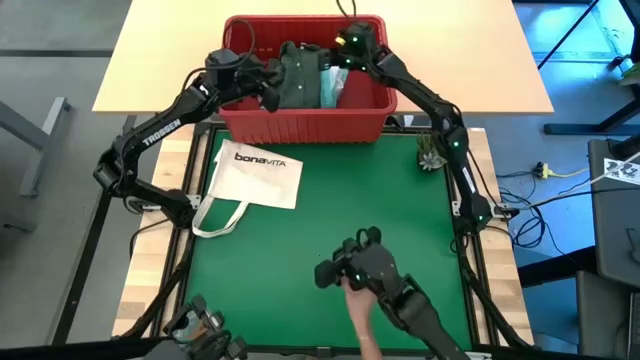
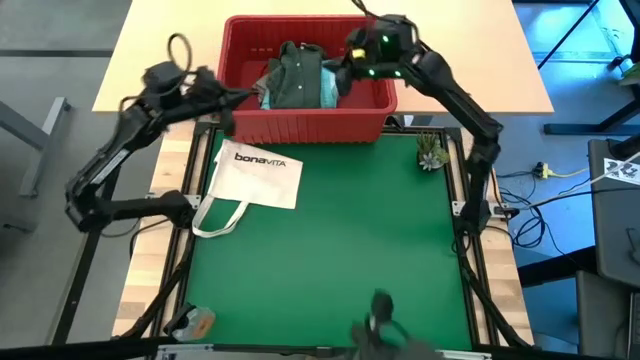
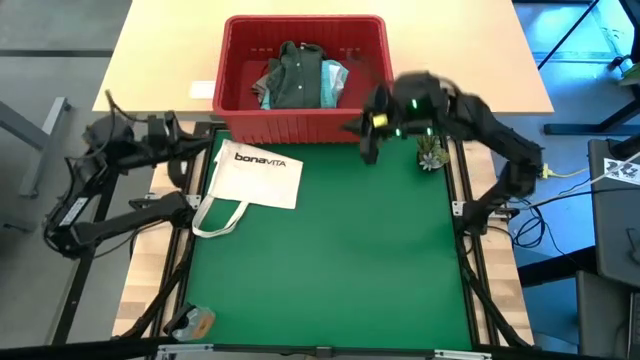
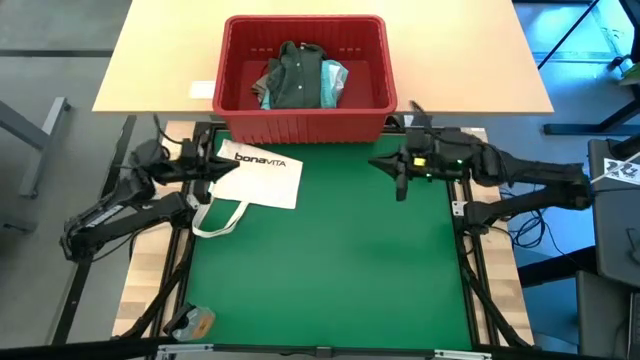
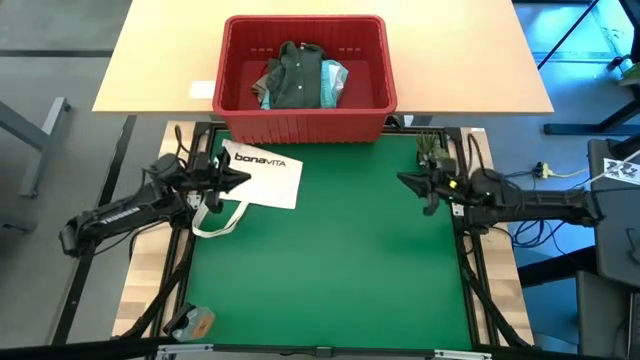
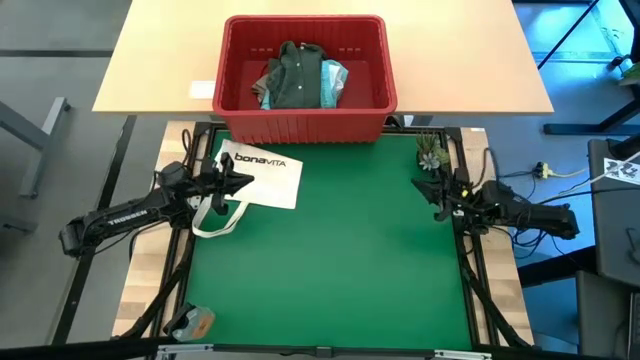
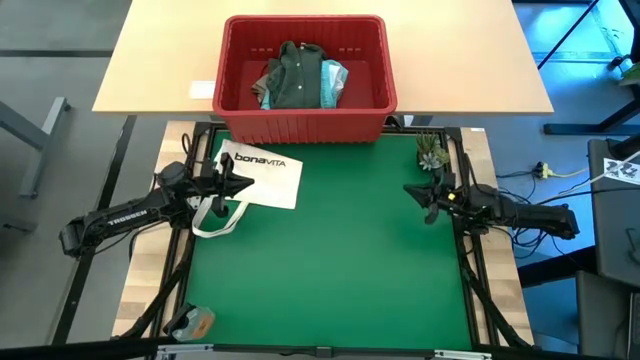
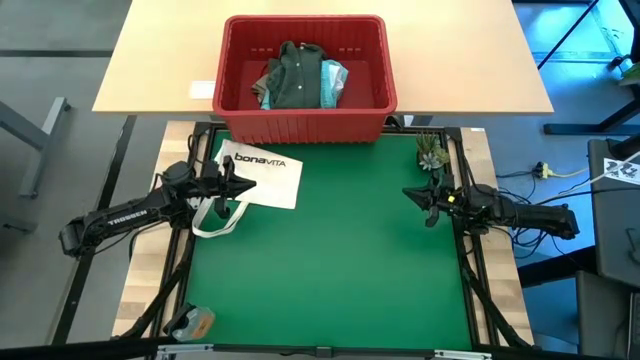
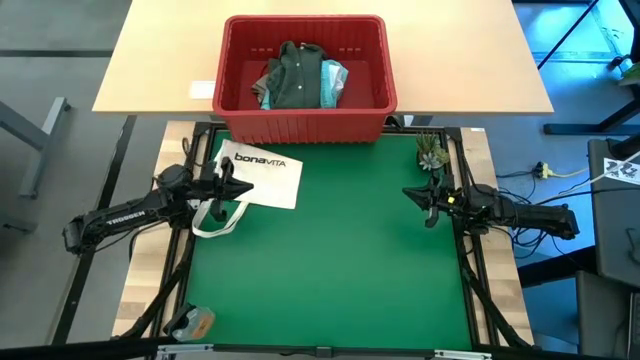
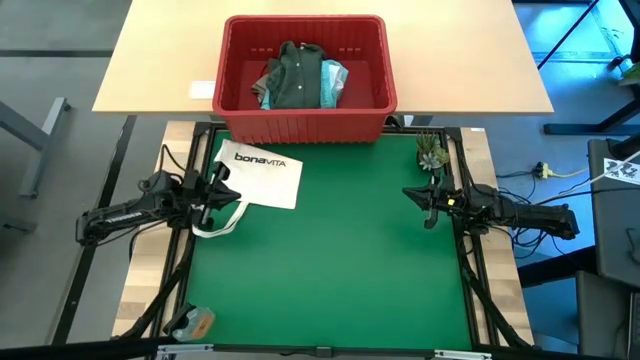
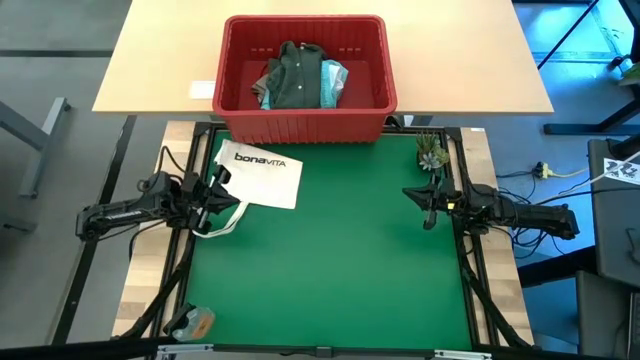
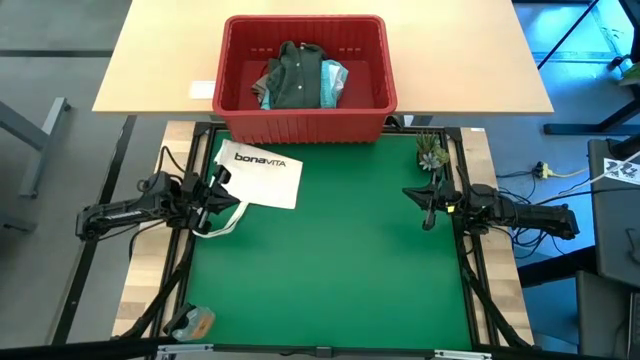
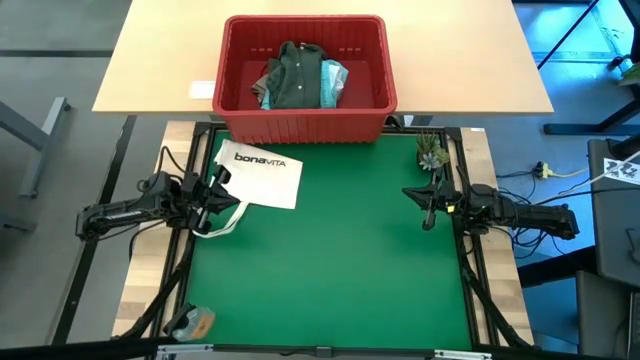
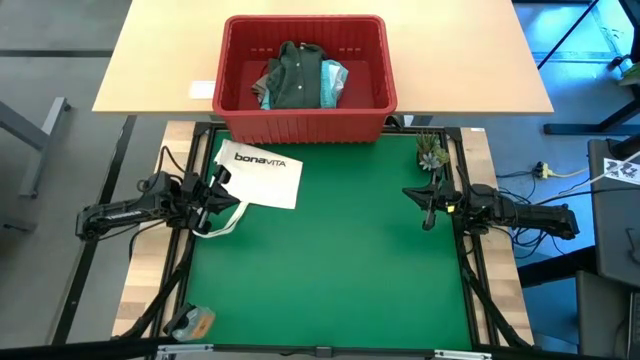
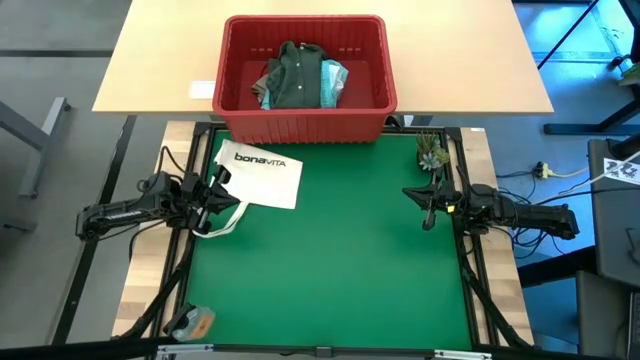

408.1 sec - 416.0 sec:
Task: Fold Laundry from Bin
Return to Home Position

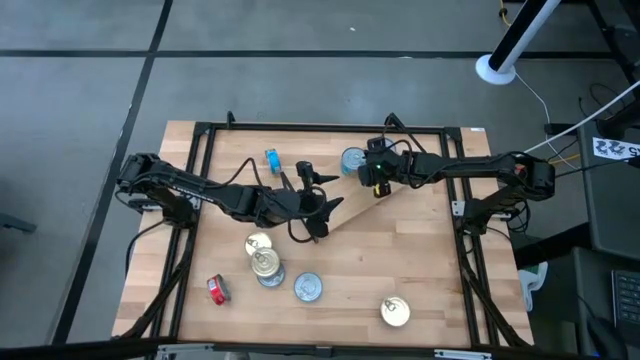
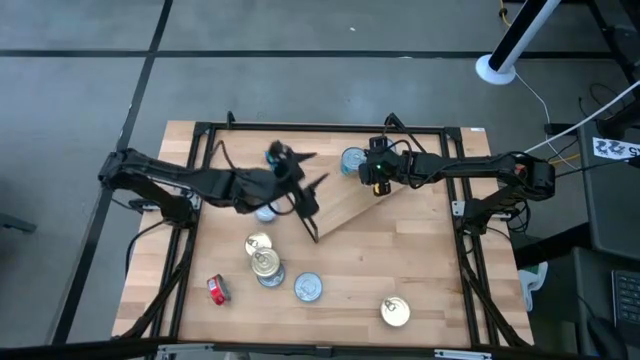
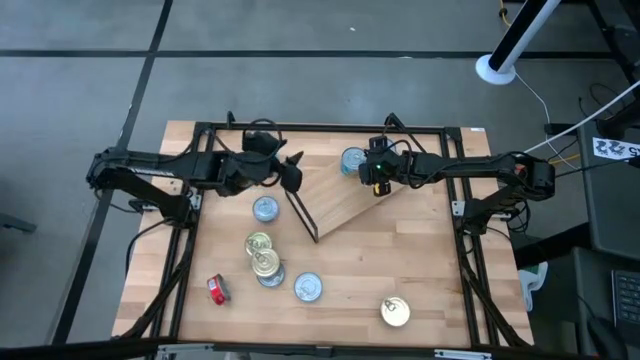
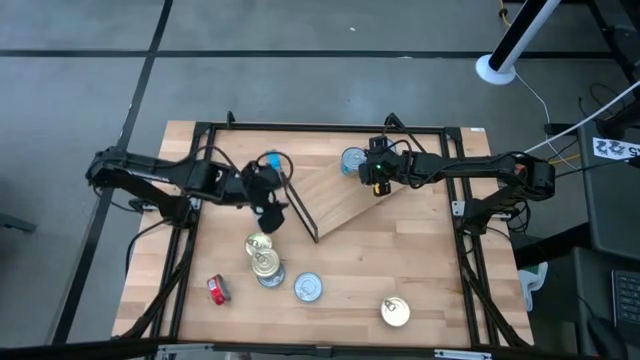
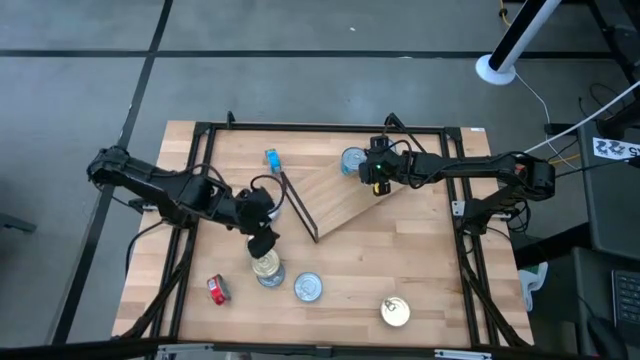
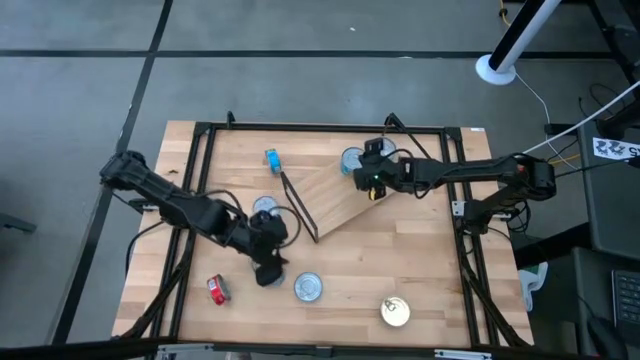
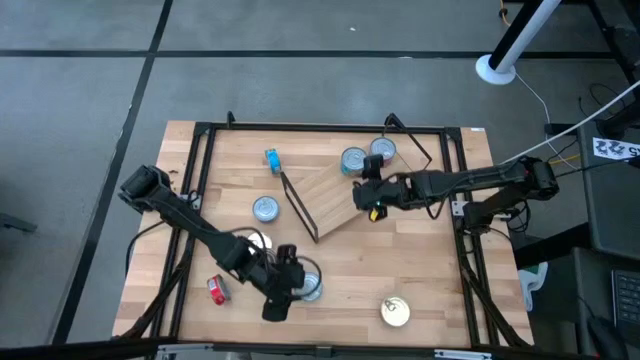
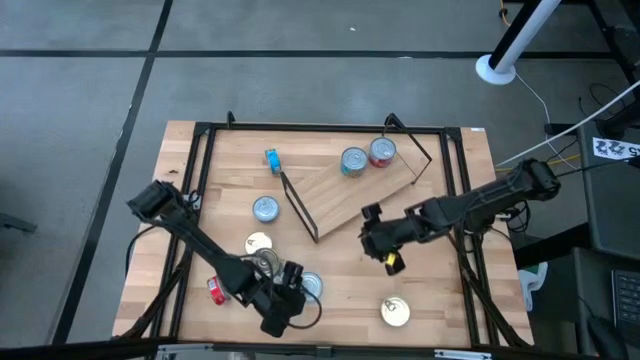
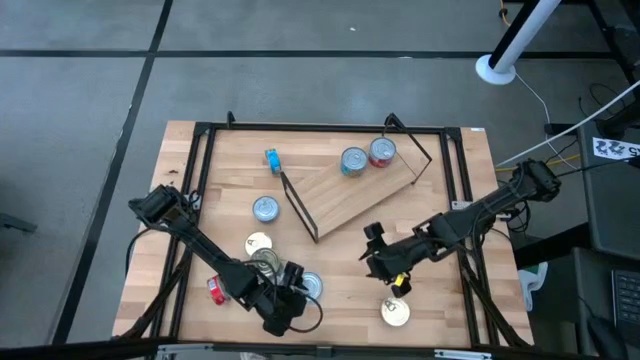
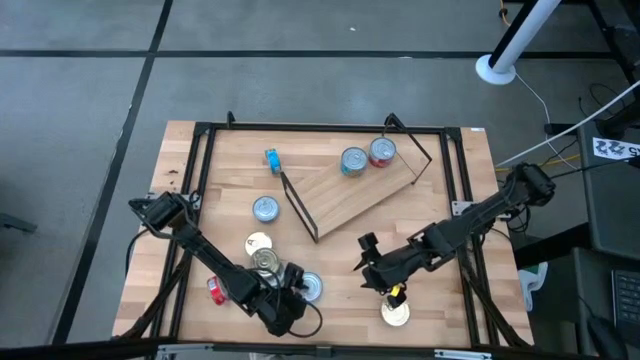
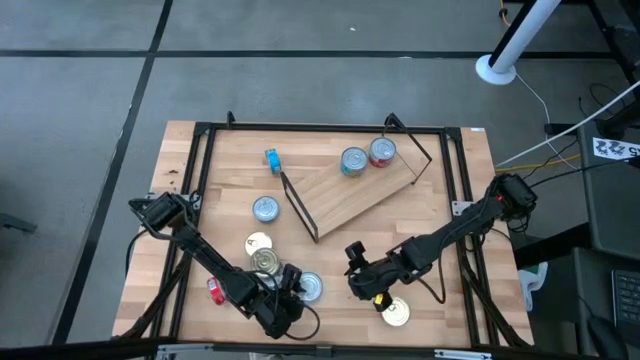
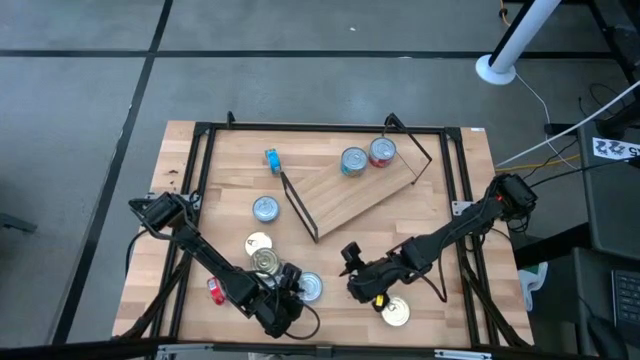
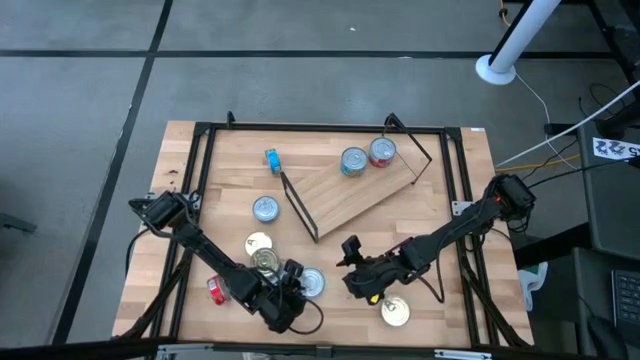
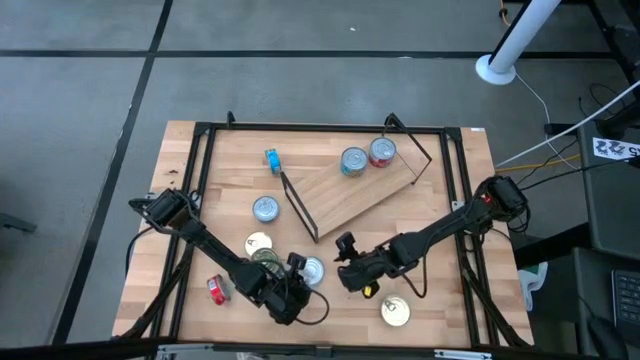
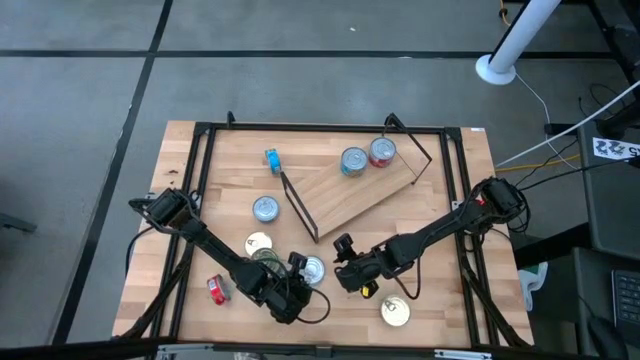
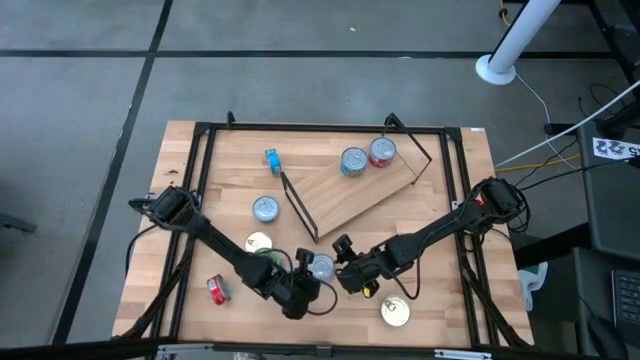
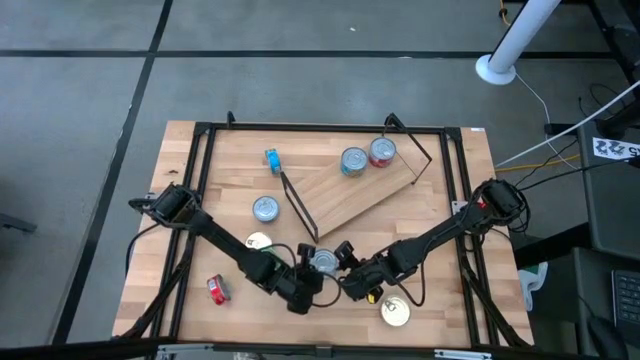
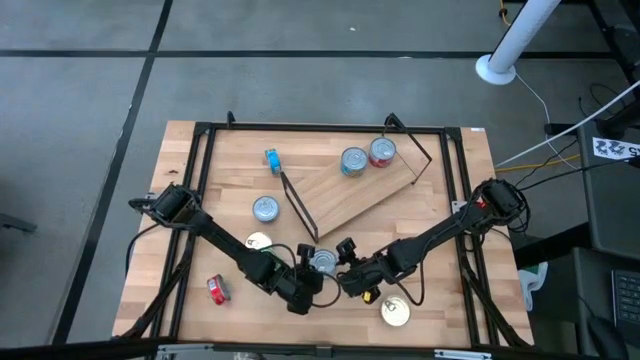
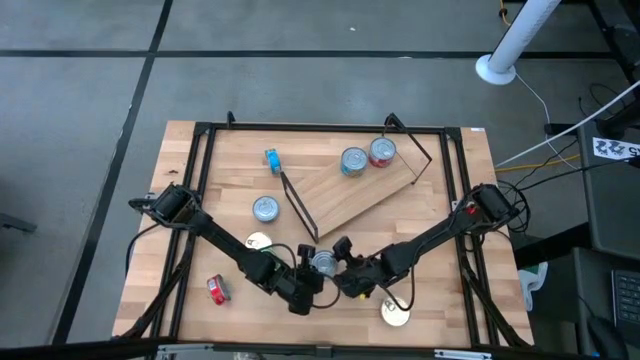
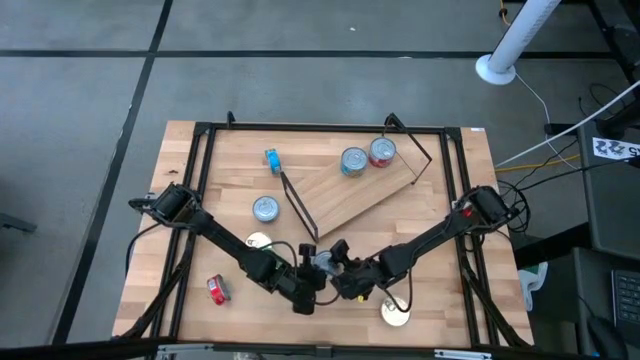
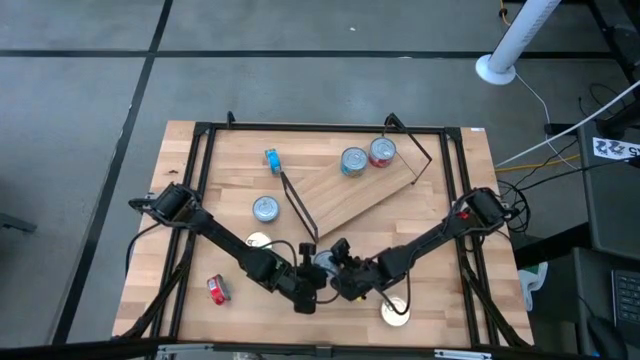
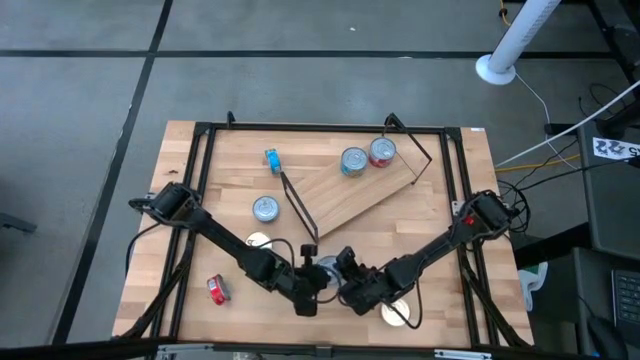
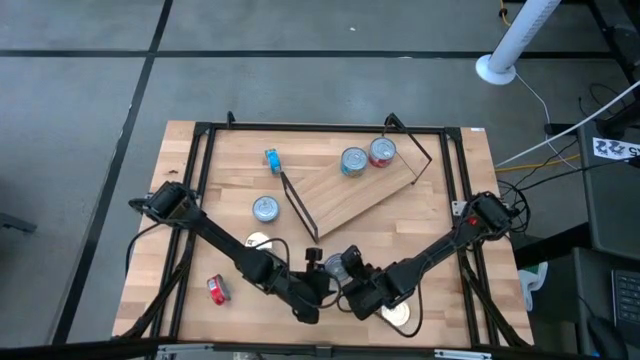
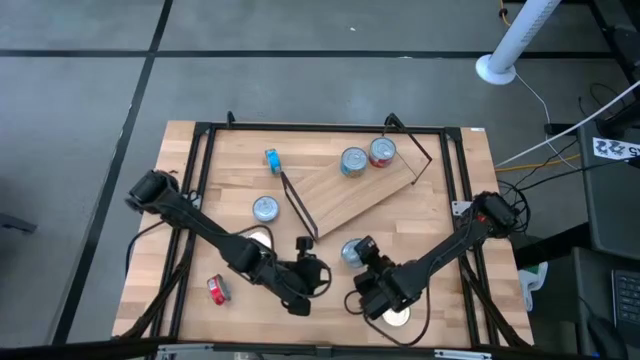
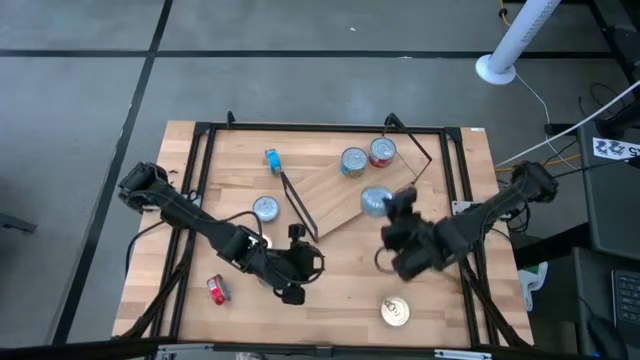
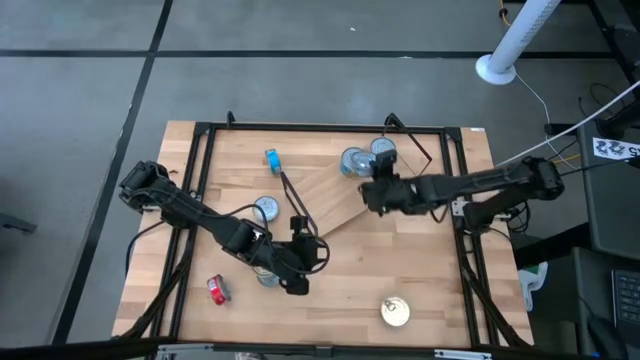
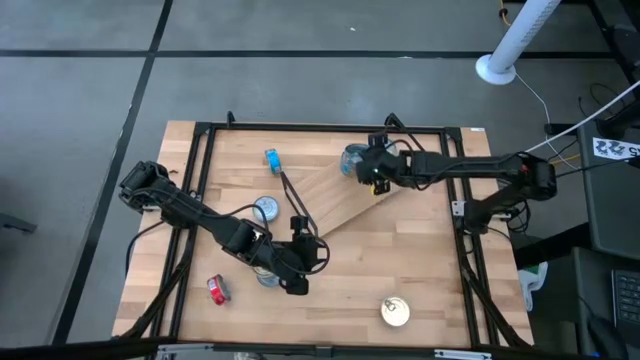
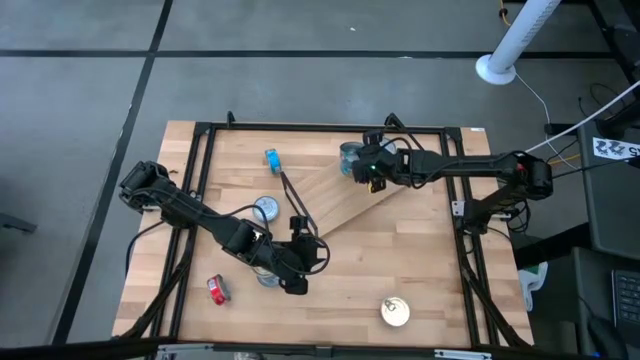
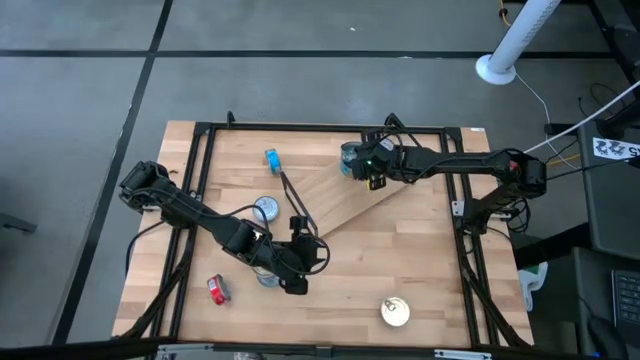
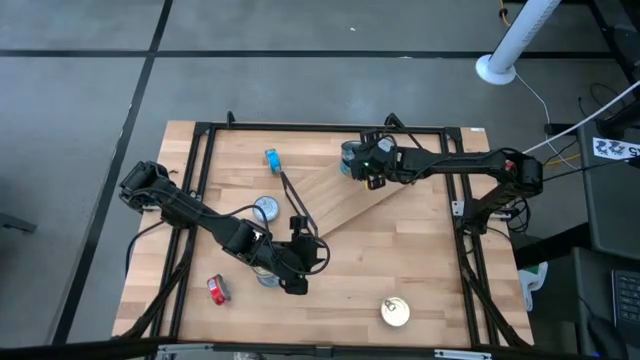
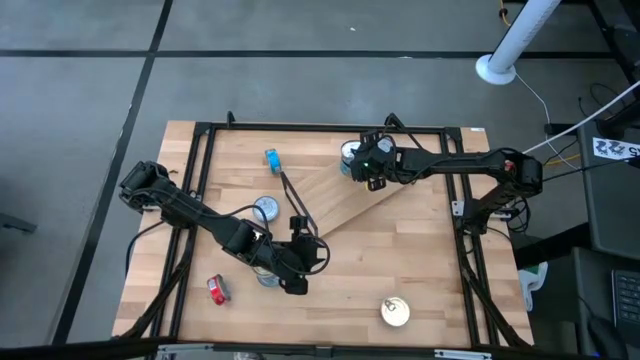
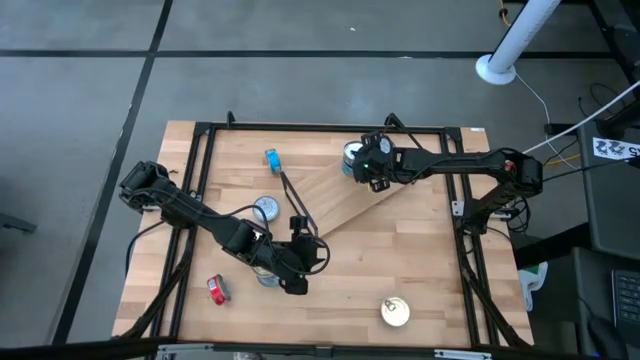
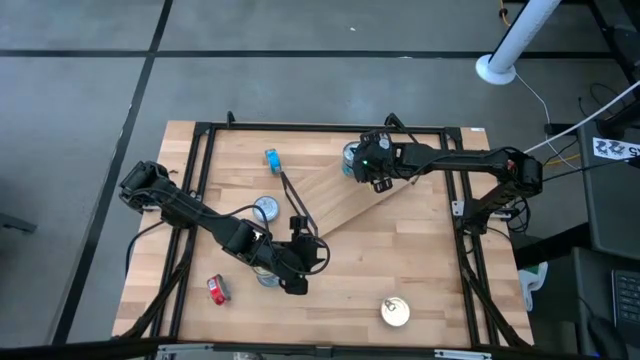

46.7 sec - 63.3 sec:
Task: Stack canned seafood by type on shelf
Stack the light blue tuna can on top of the light blue tuna can on the shelf
